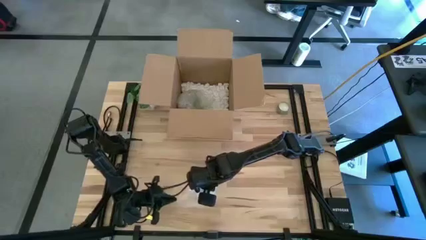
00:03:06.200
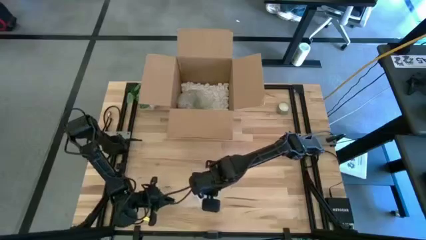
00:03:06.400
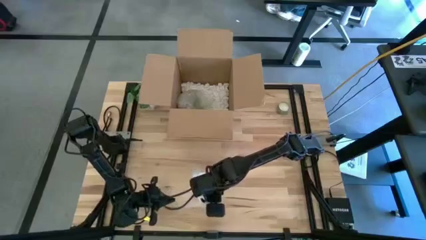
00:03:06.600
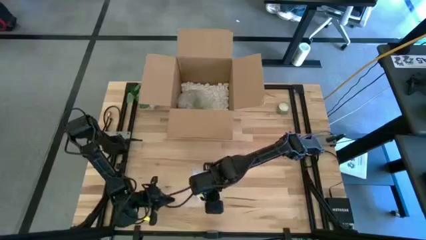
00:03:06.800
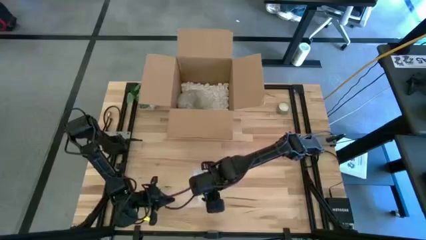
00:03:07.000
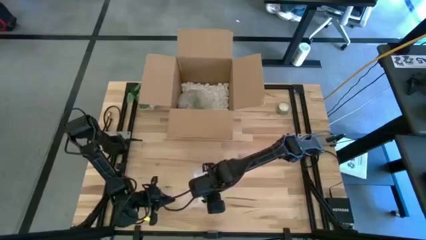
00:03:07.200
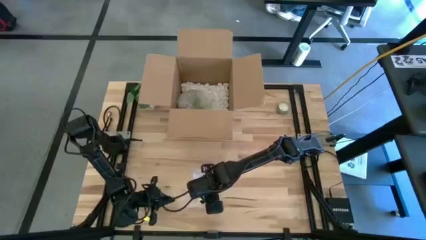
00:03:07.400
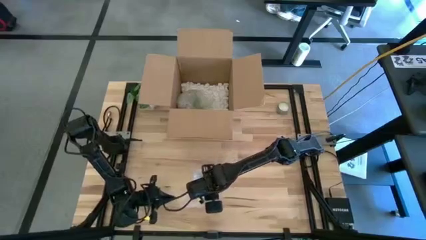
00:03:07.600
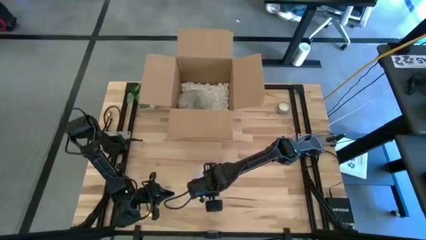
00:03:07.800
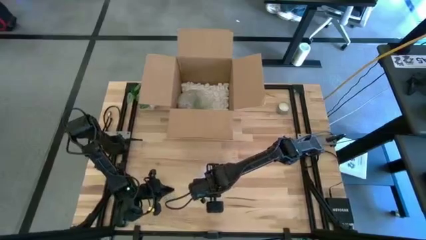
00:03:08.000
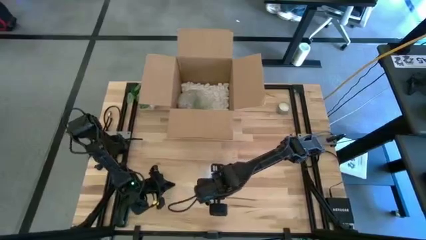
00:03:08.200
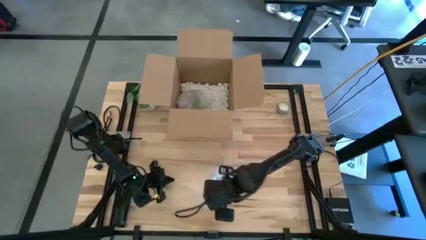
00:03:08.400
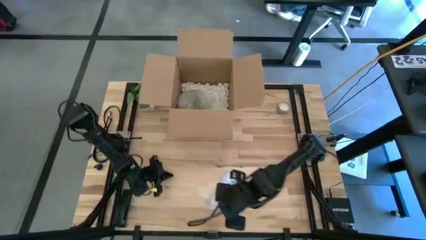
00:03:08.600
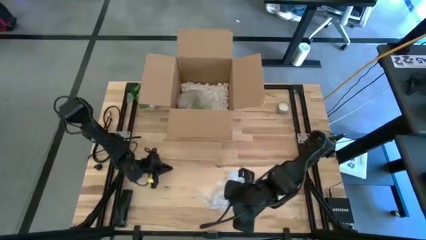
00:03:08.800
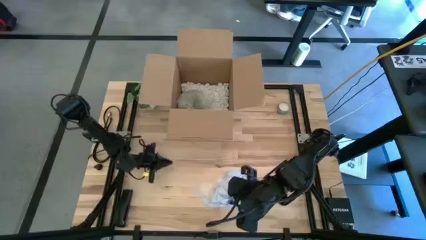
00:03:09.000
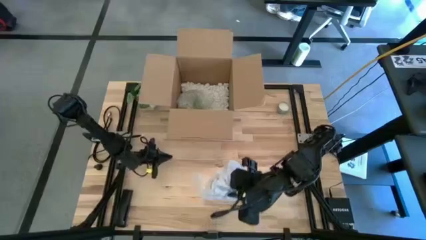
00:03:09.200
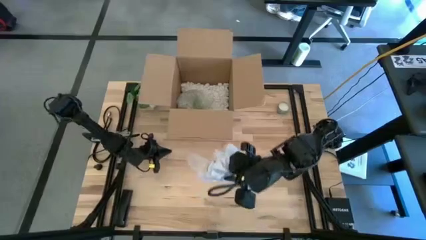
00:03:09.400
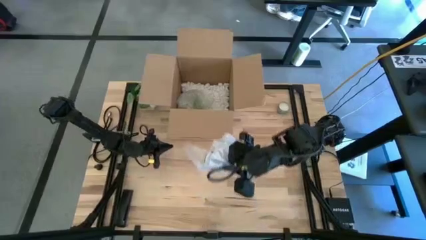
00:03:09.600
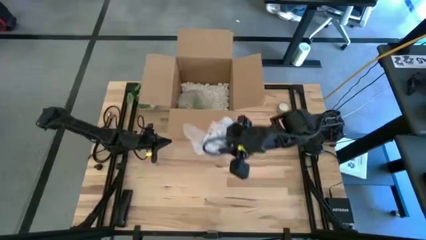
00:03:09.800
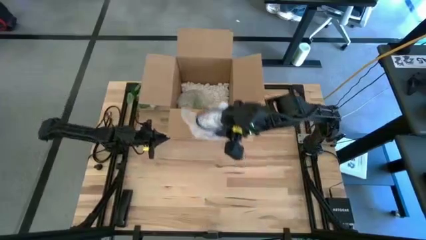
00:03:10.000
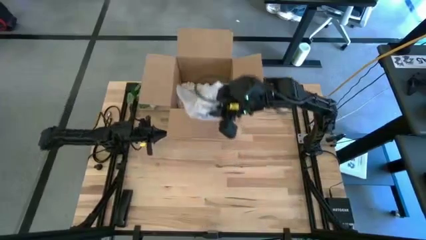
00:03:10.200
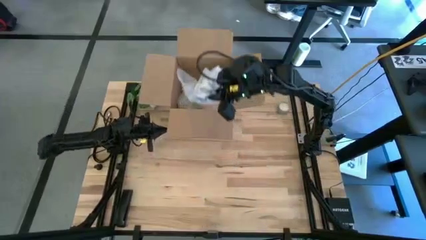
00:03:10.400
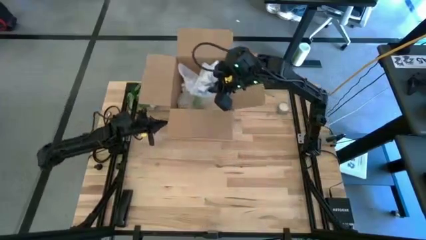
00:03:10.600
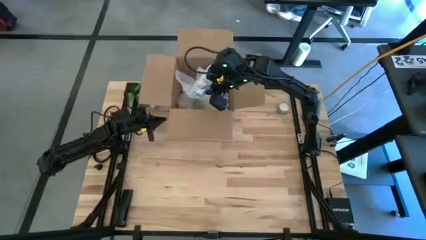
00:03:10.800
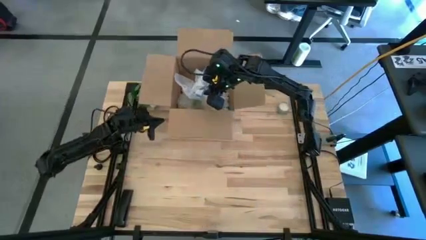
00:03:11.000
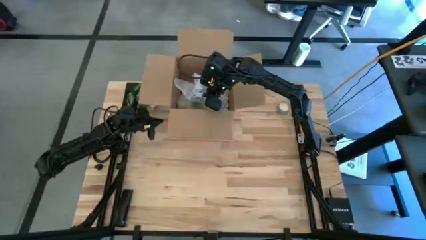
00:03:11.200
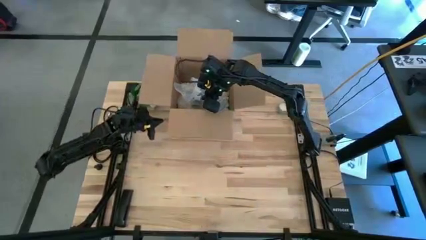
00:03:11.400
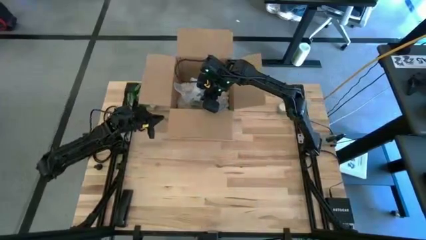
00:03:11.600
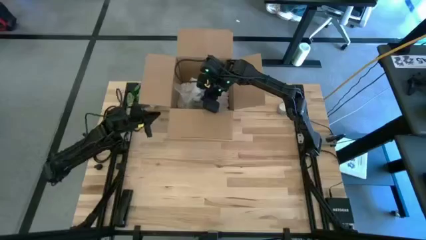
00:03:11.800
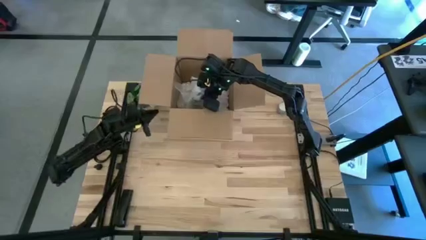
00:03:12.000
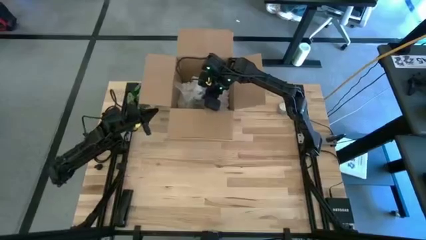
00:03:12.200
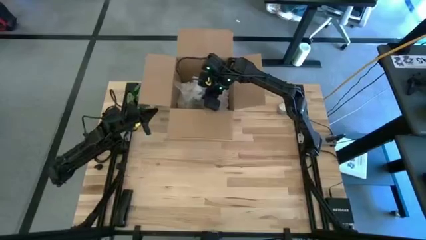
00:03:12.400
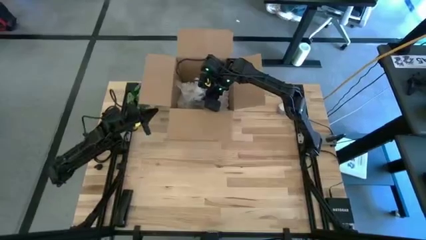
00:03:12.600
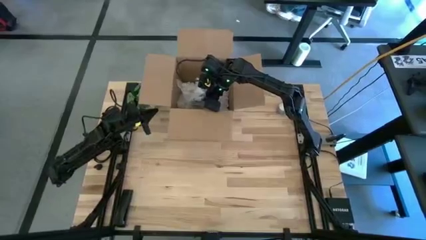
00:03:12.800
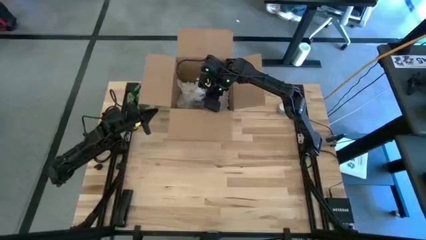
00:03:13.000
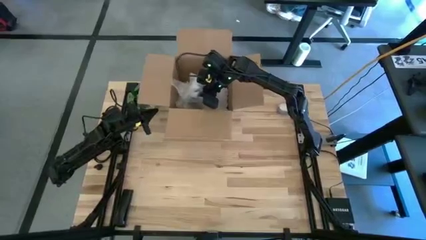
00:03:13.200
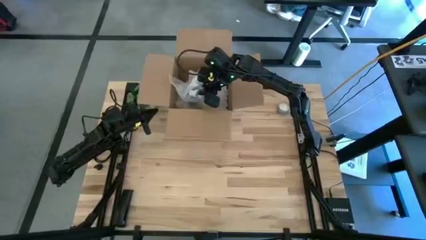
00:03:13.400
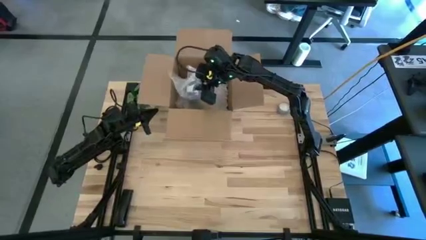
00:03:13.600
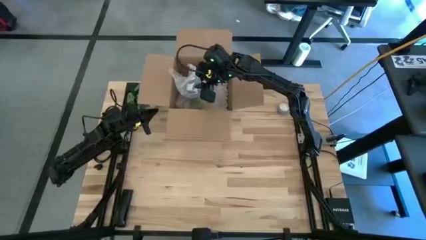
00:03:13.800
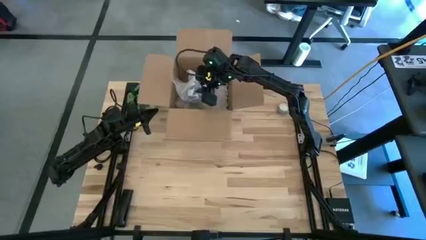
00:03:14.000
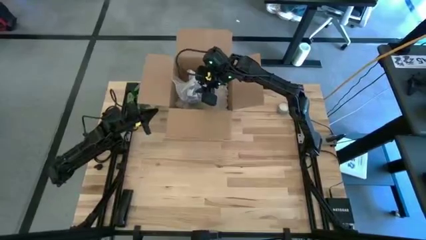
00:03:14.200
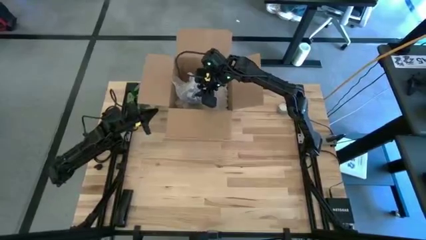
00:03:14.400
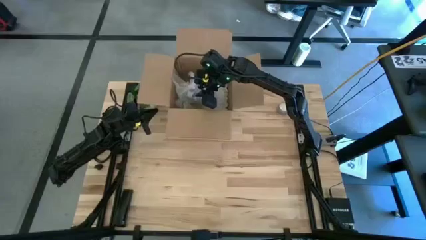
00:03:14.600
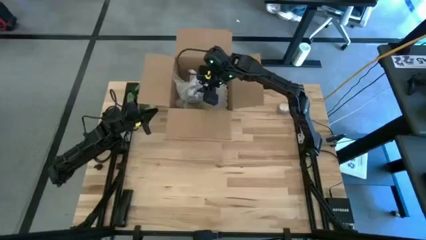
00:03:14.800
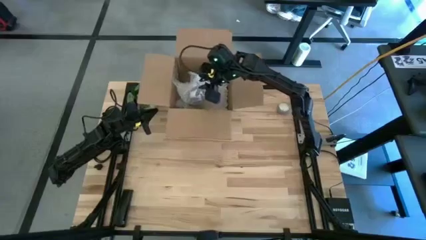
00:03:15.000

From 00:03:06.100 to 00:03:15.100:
Task: wrap mug
Put the wrapped blue mug into the cardboard box

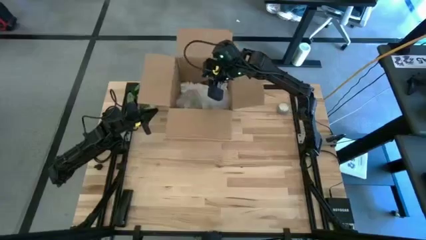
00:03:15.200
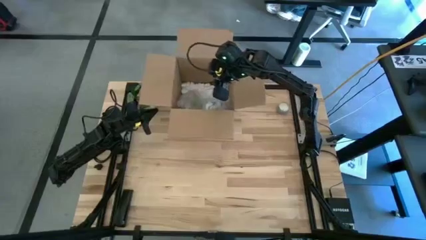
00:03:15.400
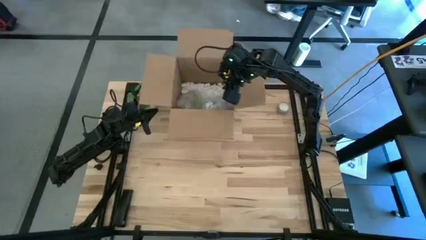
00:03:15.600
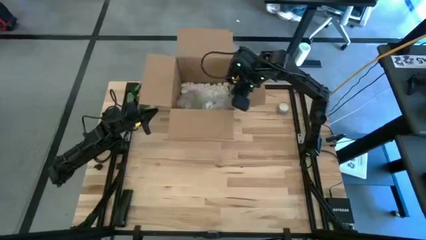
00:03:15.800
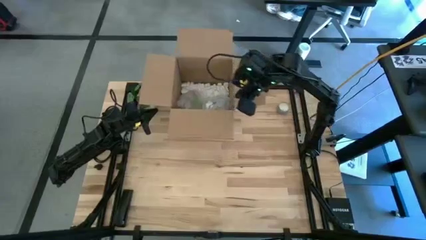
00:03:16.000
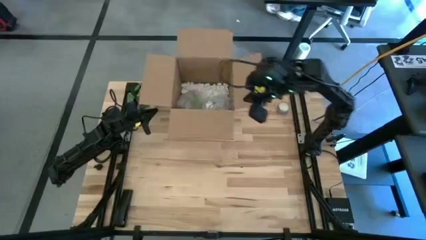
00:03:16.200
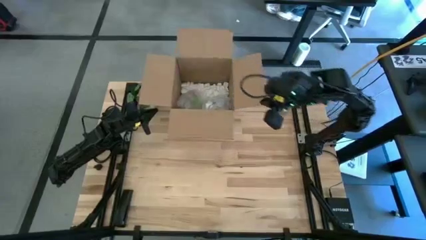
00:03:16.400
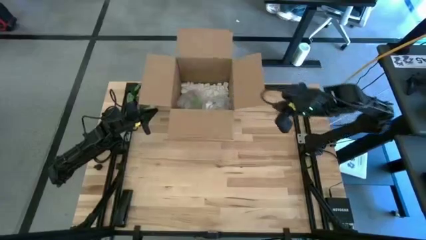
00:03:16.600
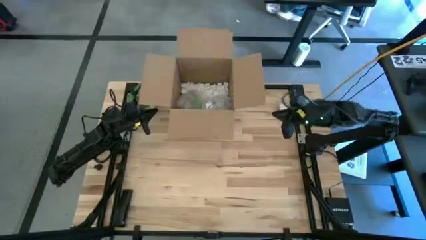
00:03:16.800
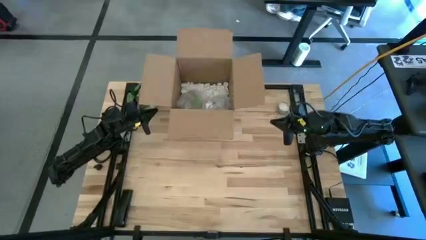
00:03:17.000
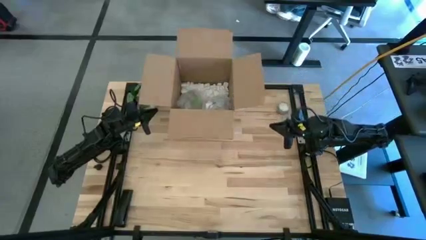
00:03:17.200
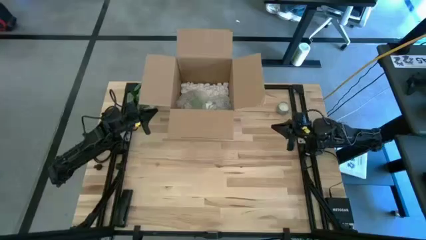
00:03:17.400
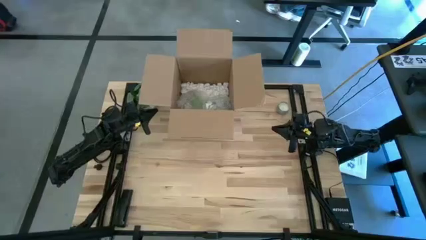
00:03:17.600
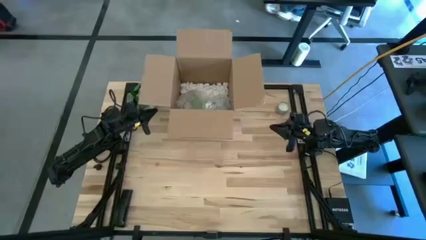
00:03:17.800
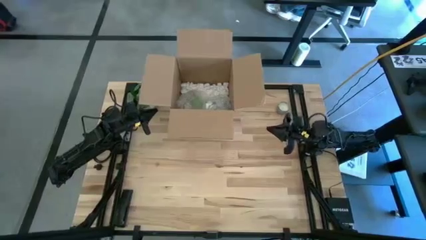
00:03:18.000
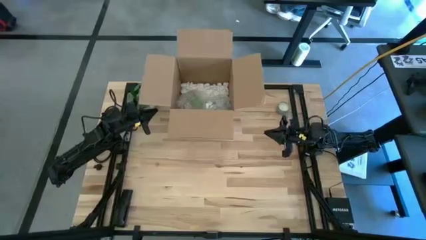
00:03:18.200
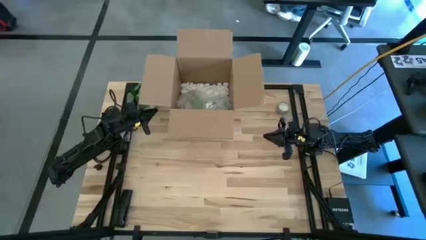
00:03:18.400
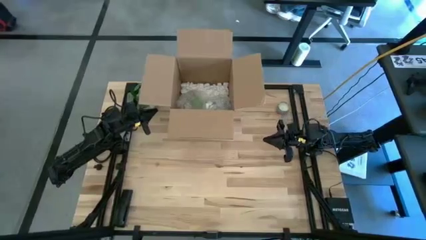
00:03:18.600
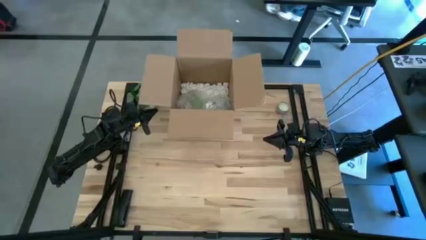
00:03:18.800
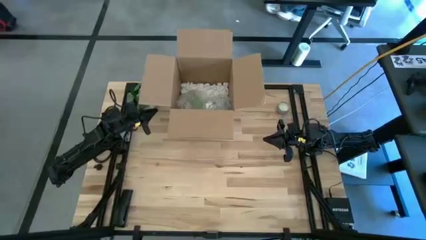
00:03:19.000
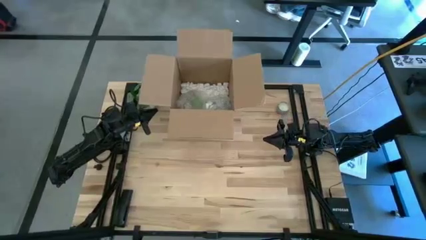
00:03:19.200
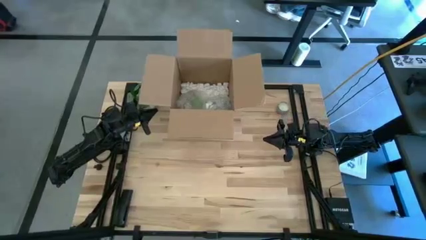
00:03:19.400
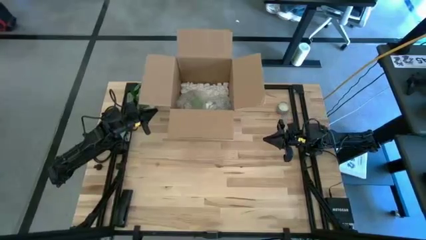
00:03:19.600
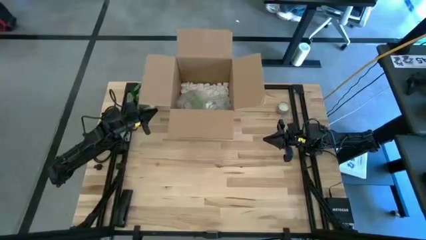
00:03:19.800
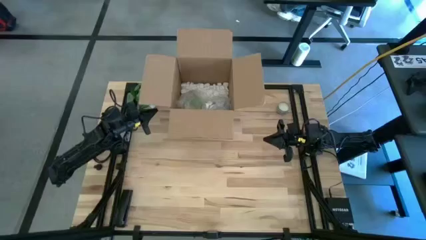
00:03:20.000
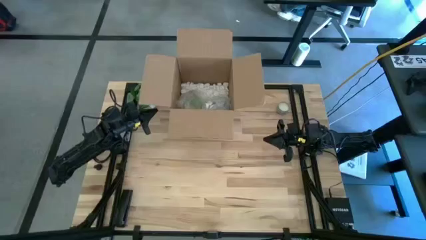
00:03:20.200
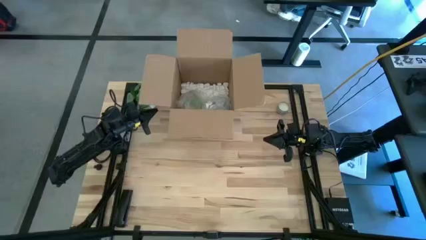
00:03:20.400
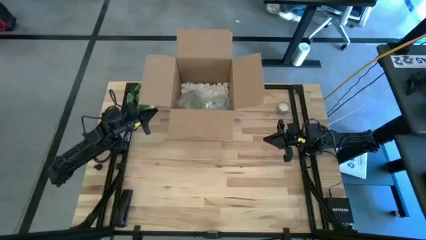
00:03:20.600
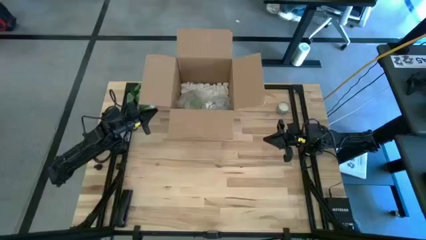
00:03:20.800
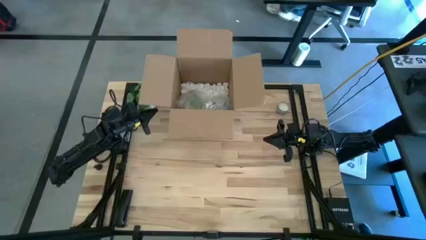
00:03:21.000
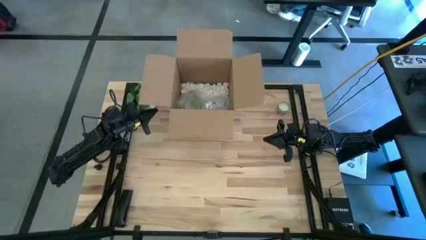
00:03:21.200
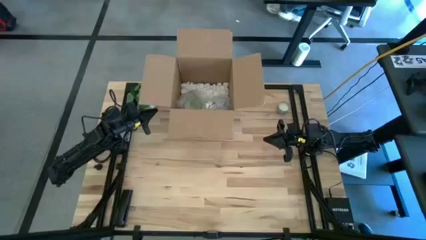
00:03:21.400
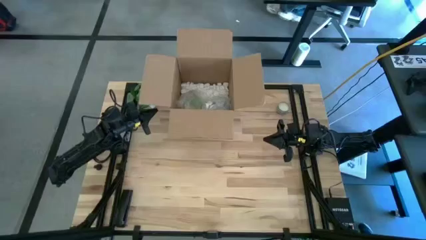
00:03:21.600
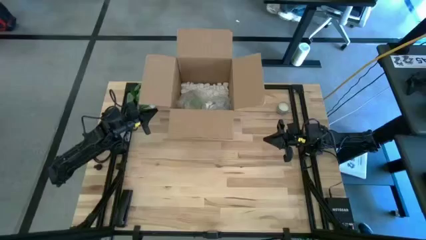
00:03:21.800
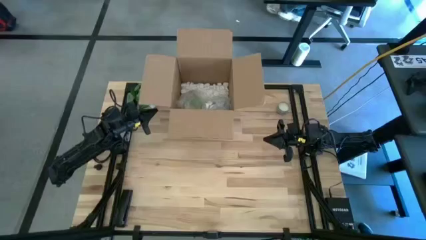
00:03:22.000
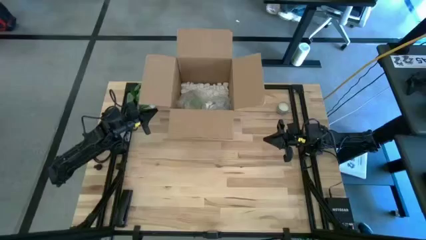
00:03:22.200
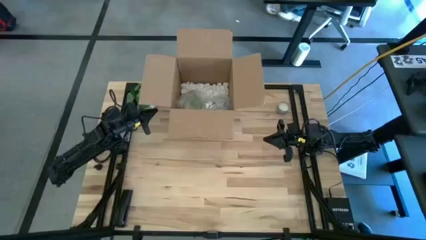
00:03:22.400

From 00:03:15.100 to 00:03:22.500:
Return to Home Position

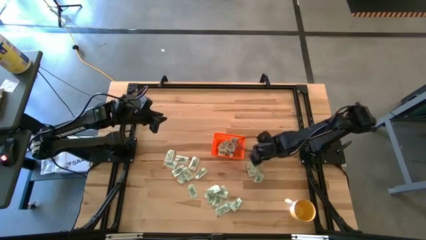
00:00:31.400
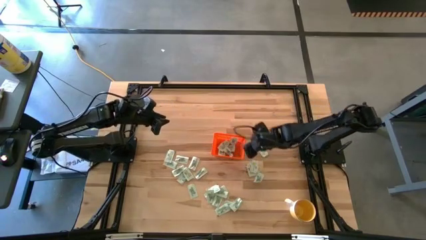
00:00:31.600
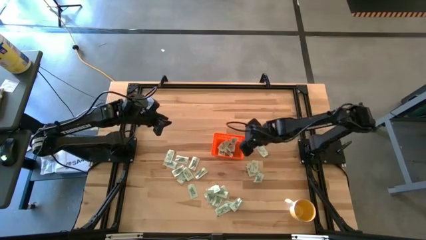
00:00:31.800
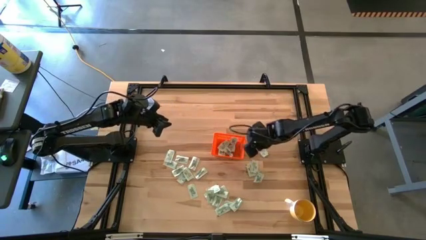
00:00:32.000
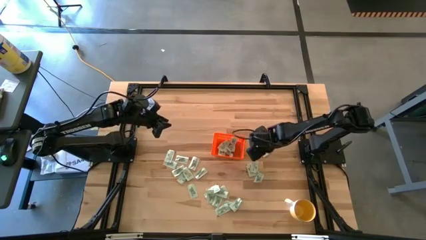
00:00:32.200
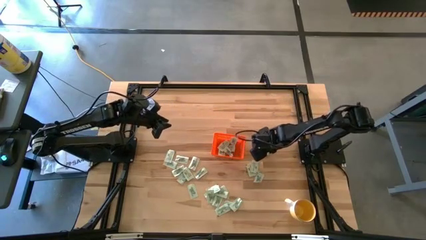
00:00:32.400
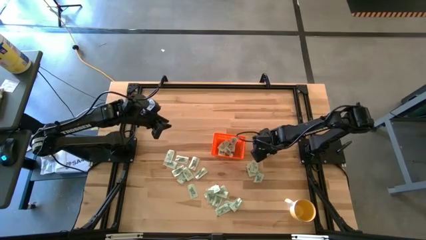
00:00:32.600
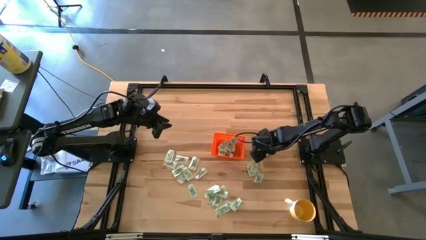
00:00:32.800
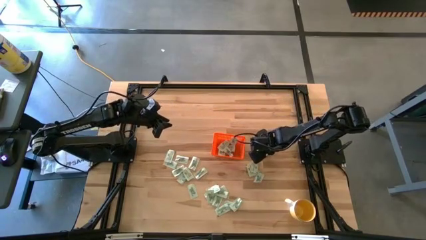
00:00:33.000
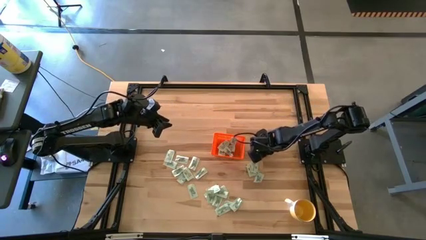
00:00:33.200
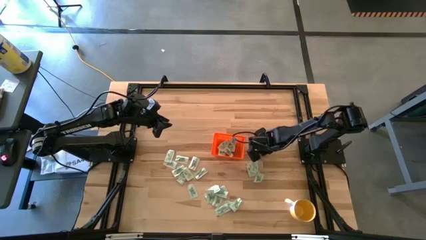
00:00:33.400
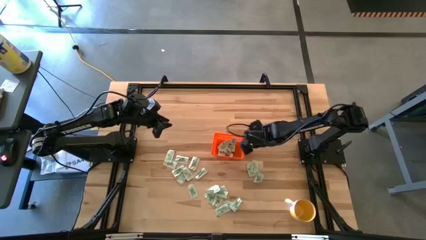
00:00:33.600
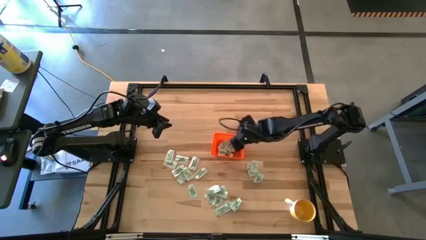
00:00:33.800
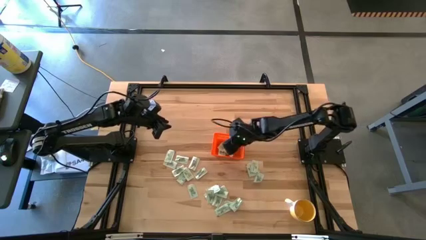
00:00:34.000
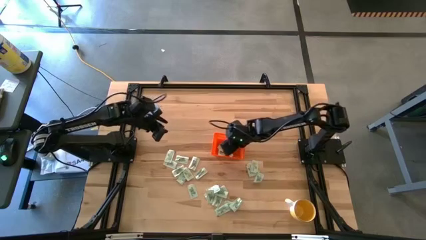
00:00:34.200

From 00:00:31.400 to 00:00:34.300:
Task: Pick and place Stevia / Truvia into bins
Put the white stevia packet into the orange bin
